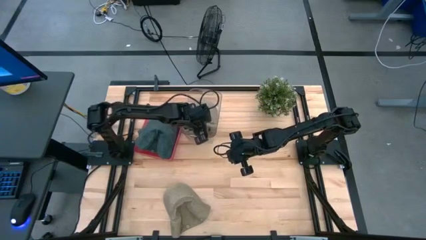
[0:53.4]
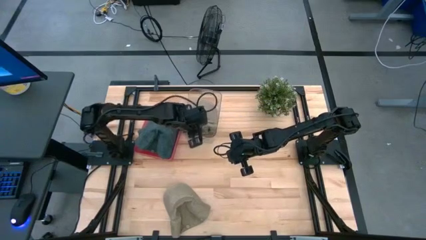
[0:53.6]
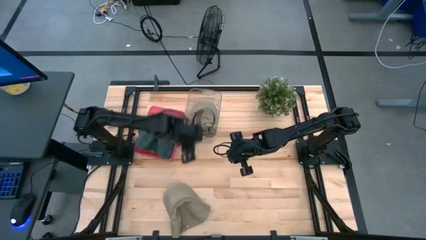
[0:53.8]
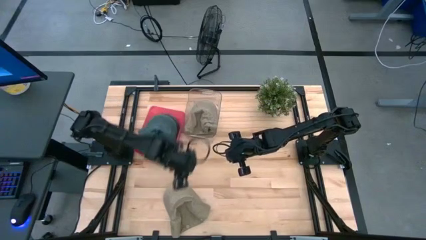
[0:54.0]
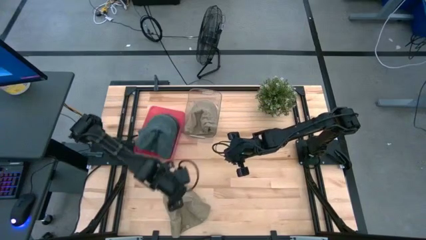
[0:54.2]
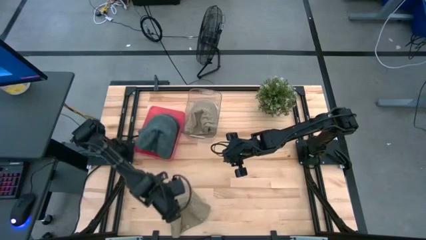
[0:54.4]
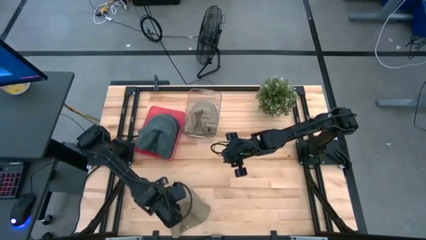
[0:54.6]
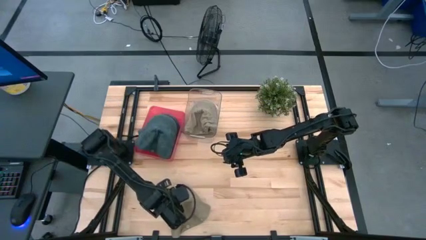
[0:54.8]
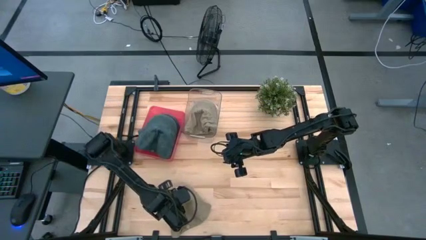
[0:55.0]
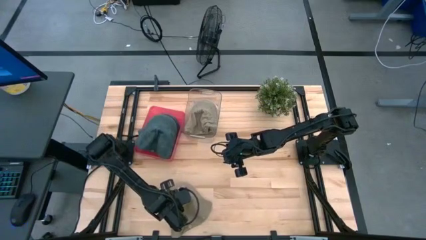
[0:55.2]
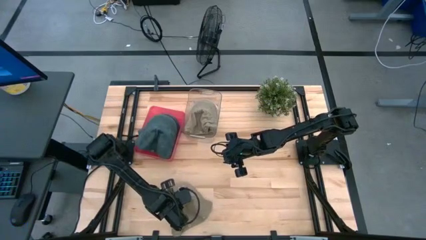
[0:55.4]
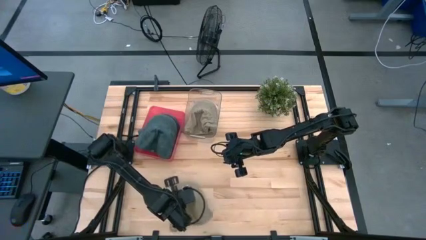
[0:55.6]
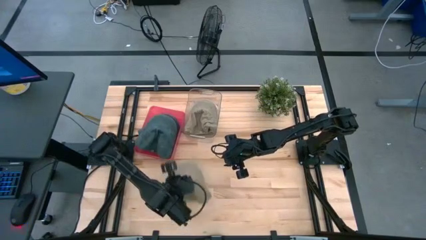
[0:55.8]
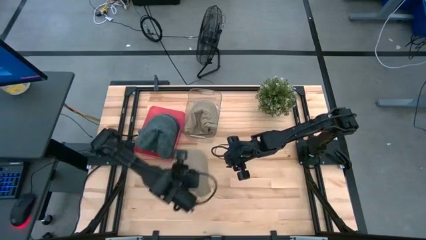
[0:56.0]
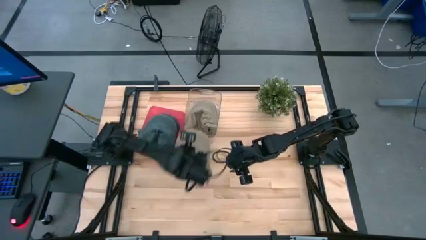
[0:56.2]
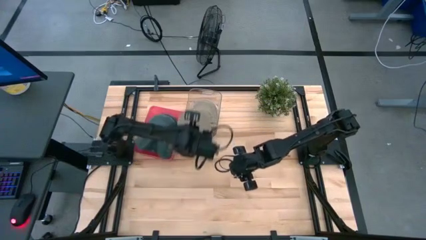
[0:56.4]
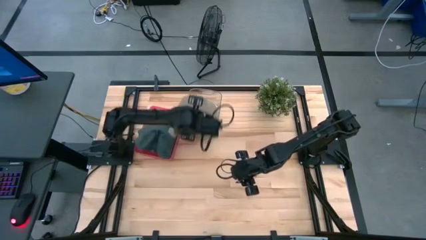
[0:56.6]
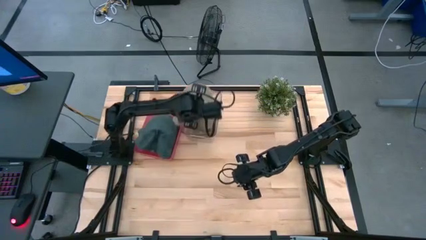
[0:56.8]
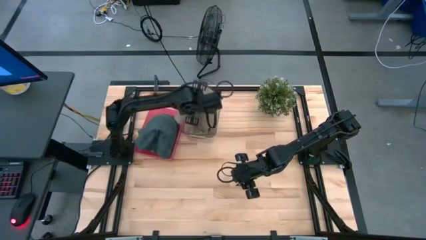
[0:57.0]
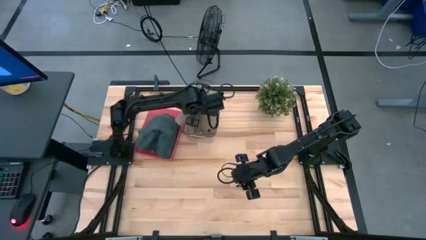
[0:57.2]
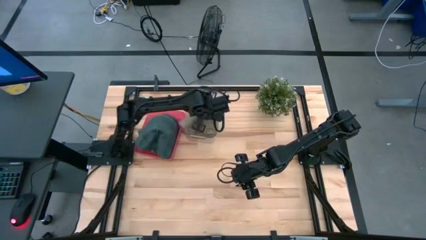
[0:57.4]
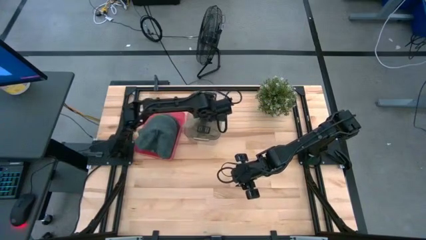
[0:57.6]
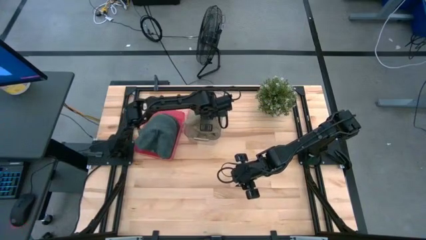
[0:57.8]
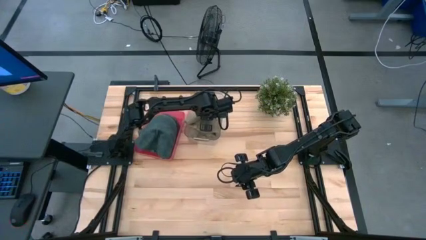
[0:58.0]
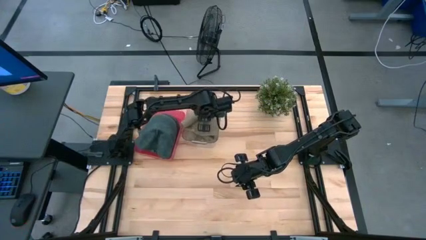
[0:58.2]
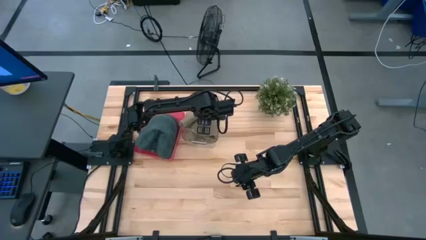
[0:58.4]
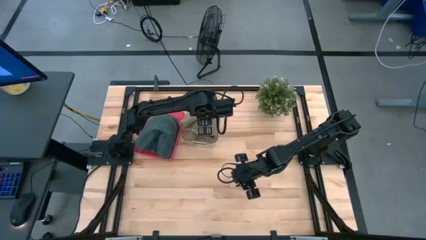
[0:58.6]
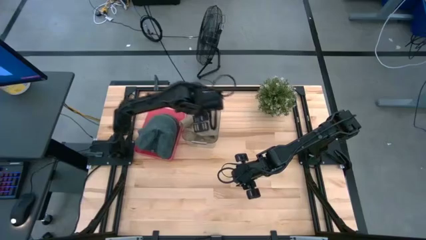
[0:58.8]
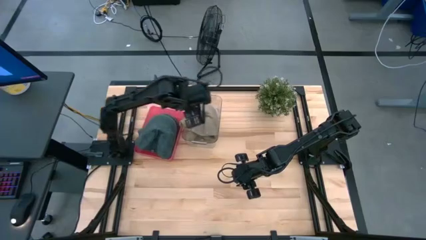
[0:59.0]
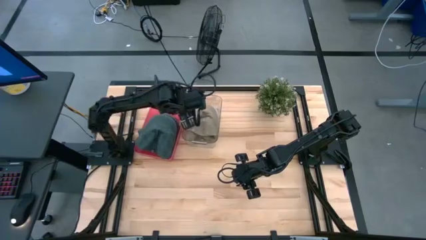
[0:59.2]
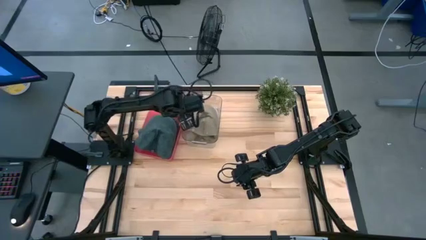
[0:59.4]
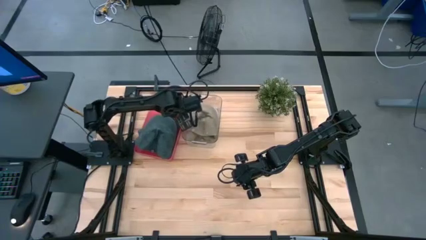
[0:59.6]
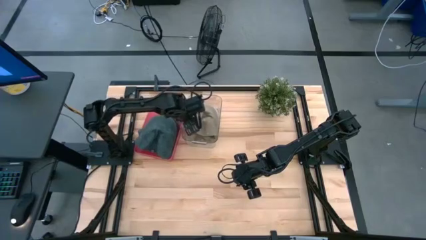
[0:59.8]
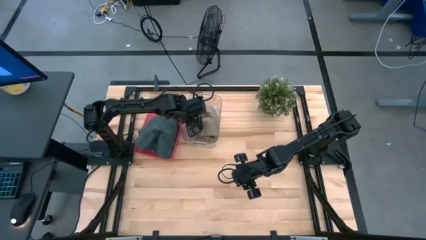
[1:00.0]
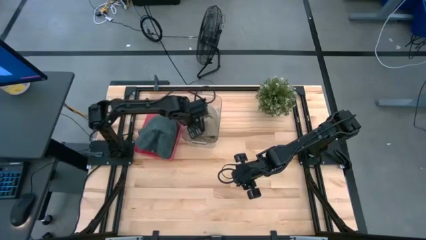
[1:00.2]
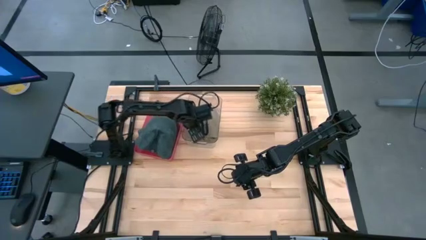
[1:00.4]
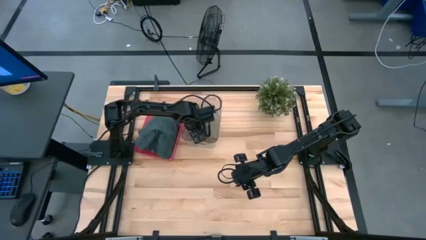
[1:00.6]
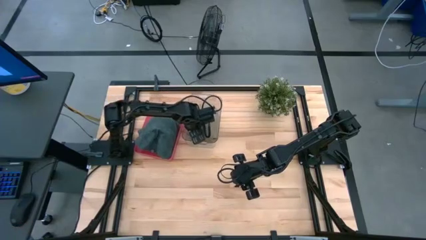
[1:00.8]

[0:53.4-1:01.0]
Task: Pick & Place hat
Put the brown cap into the transparent bin

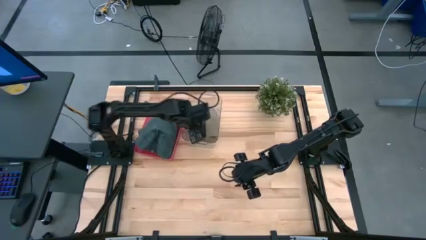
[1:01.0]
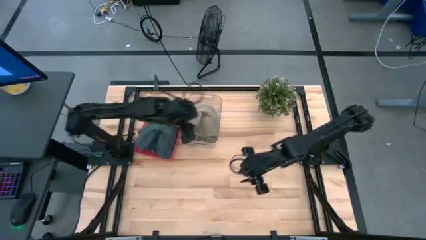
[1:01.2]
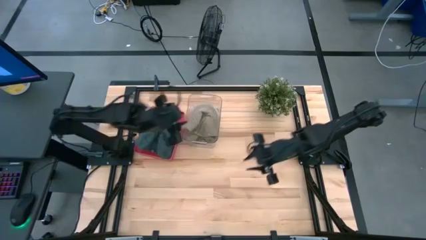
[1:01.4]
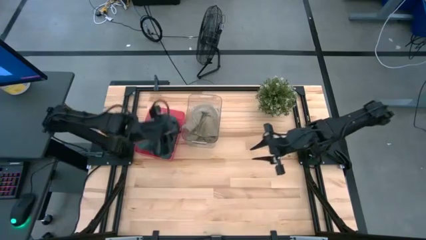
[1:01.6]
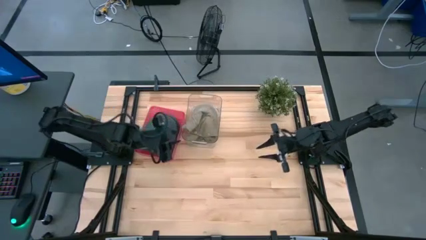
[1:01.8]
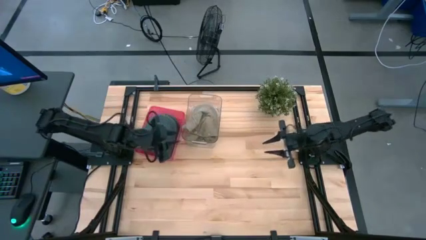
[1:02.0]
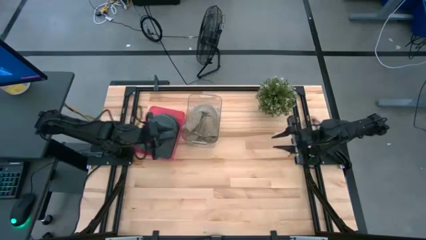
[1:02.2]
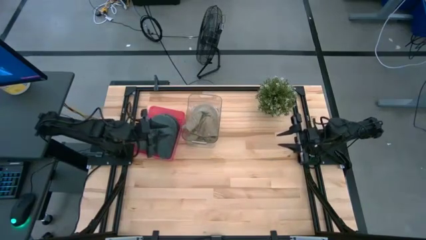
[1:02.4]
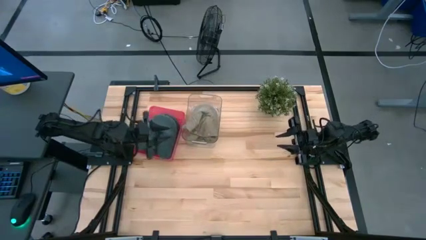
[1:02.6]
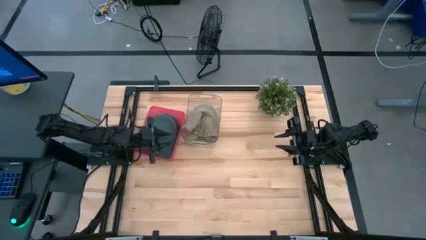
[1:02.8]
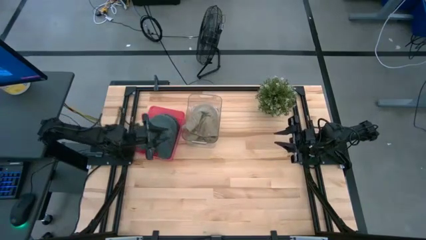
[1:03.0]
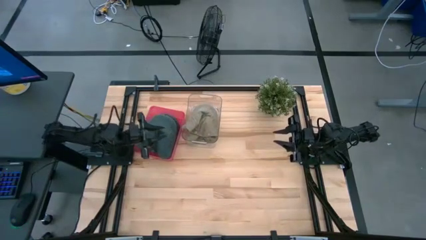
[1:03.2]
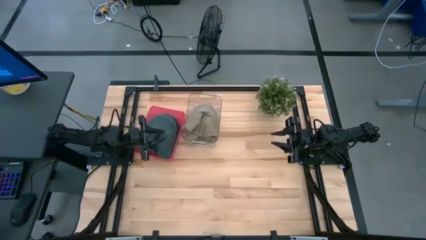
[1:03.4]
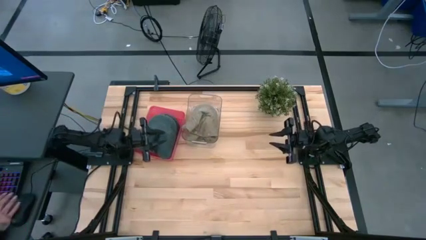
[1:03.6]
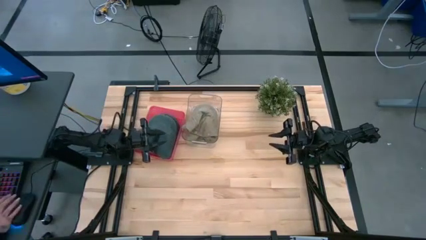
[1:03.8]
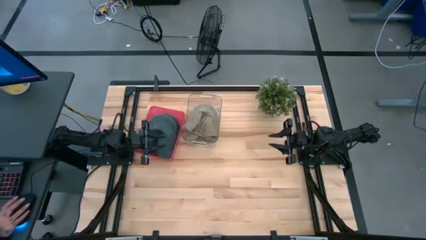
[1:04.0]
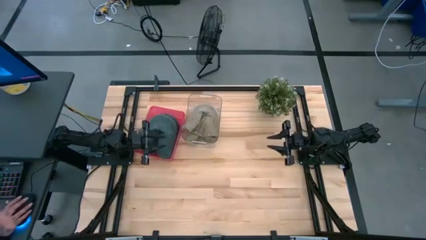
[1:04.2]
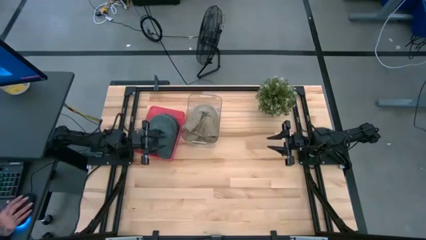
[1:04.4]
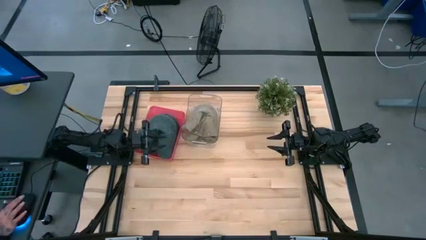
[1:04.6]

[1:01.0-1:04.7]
Return to Home Position

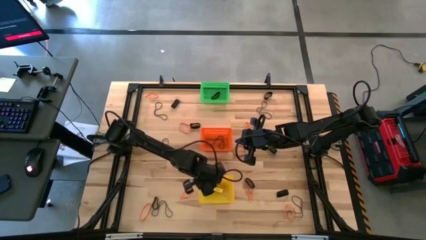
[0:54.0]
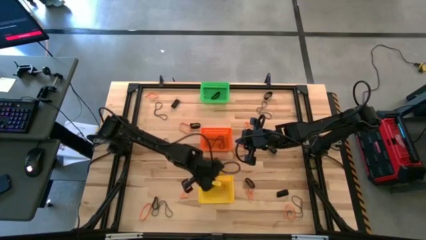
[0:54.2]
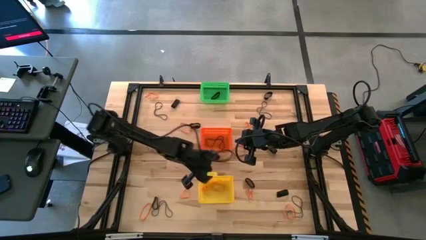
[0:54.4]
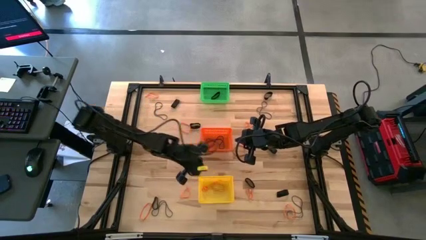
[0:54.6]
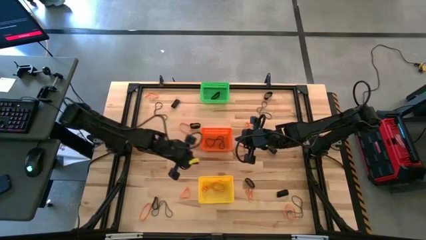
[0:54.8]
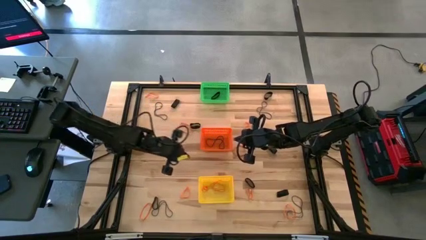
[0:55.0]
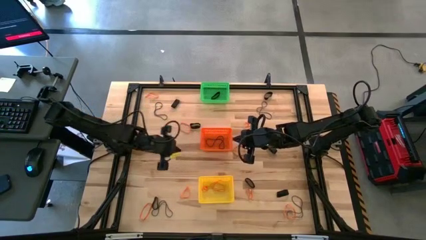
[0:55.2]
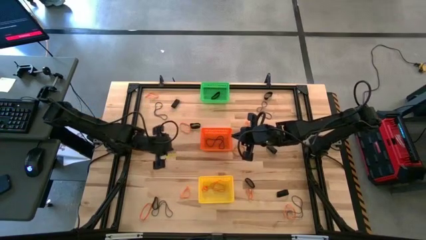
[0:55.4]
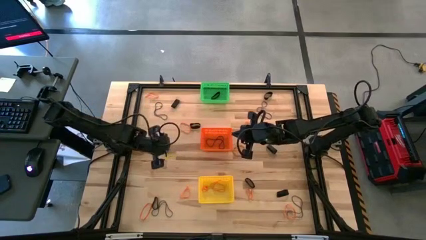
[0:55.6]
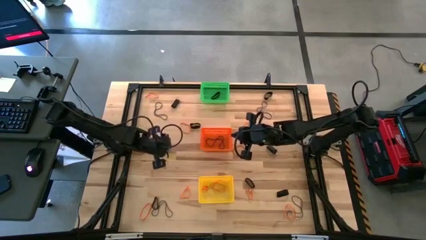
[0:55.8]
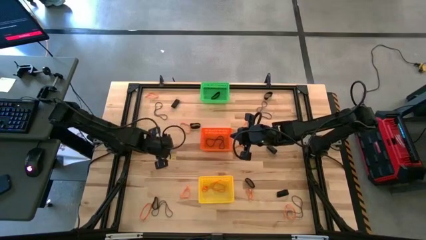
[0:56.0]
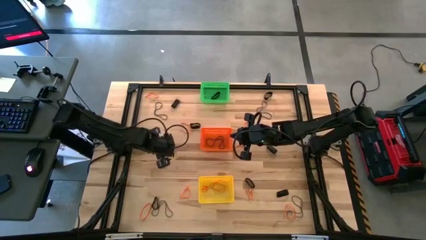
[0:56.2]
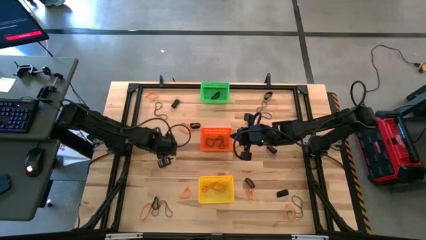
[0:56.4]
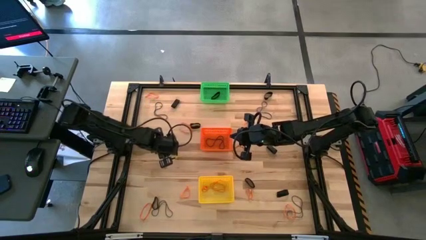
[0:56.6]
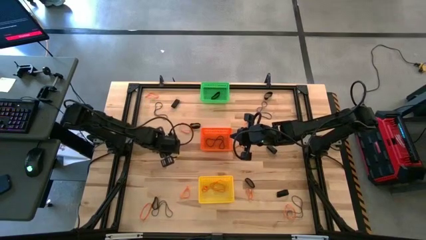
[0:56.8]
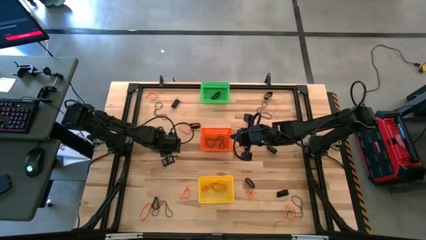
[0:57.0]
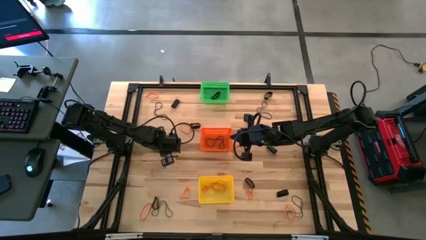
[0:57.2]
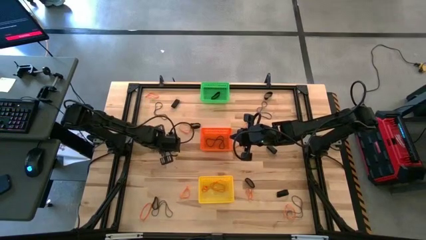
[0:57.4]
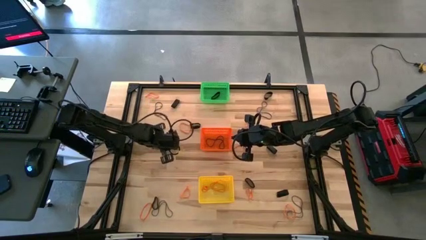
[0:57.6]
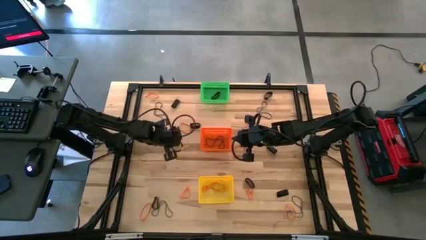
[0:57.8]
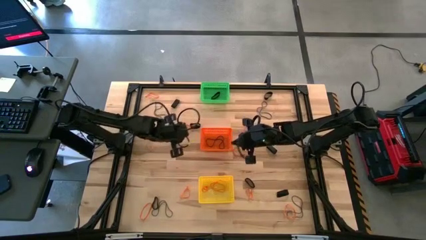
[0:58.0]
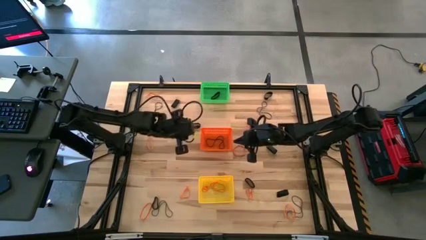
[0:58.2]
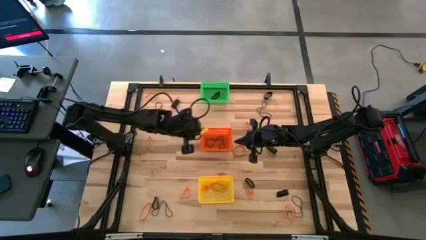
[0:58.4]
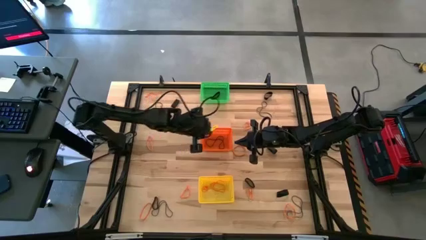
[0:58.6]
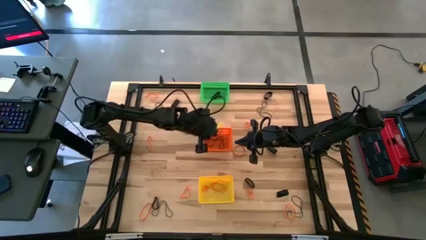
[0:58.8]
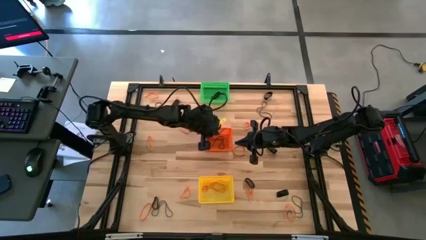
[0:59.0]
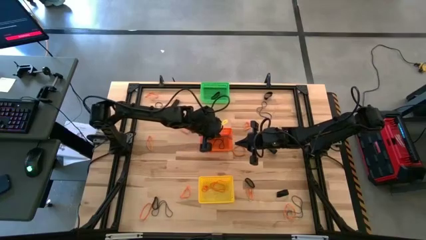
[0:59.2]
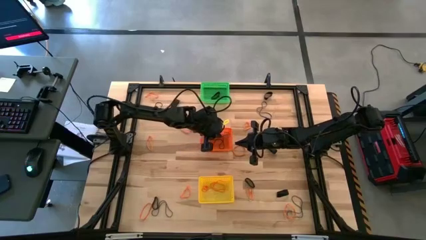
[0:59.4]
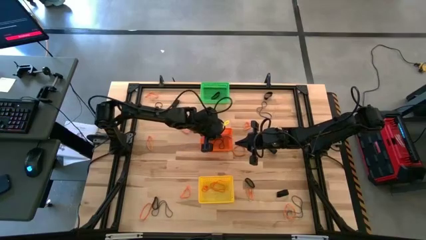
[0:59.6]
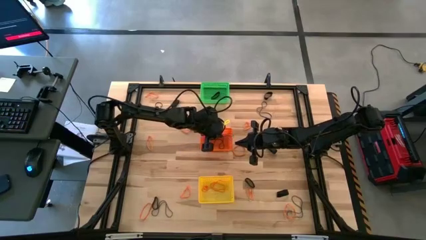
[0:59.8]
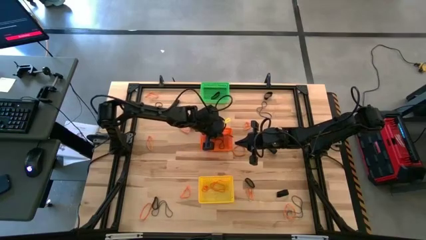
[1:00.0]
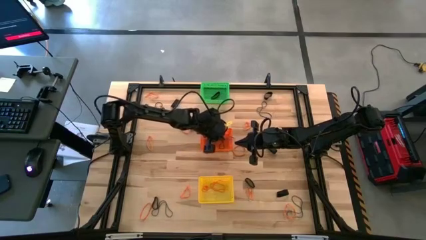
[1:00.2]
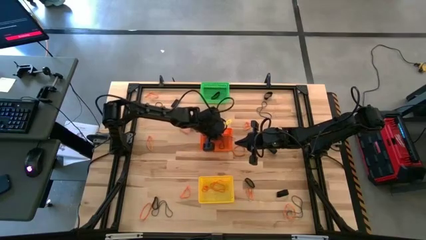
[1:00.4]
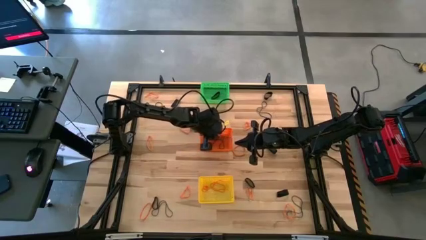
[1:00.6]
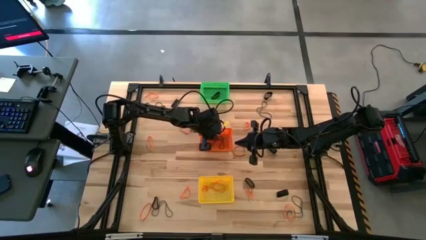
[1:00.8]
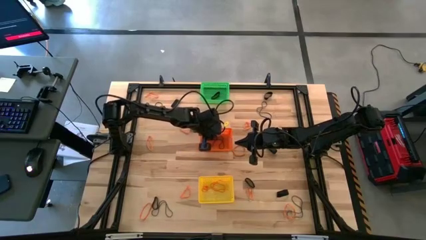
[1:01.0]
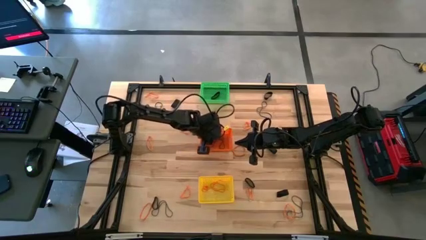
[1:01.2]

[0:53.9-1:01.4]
Task: Sort rubber bands into baskets
Put the purple rubber band into the orange bin
